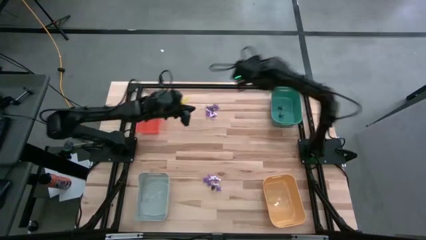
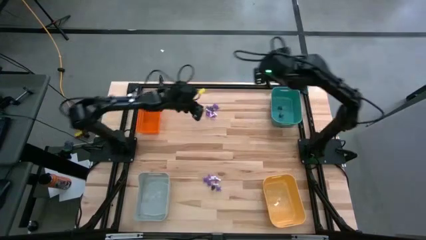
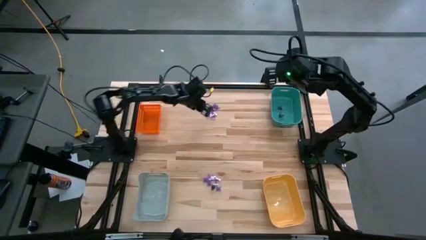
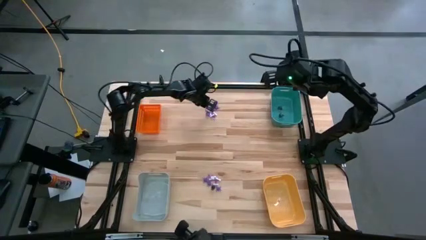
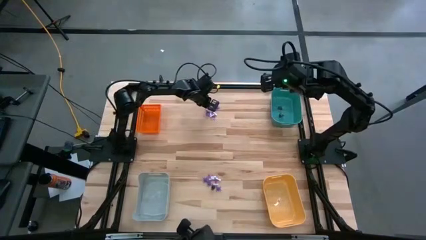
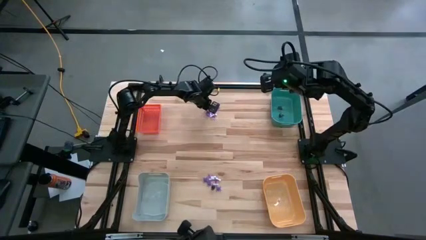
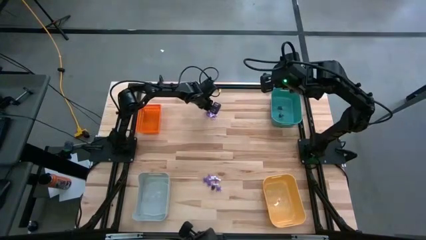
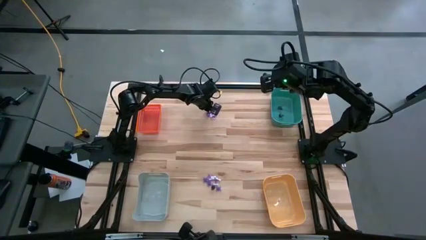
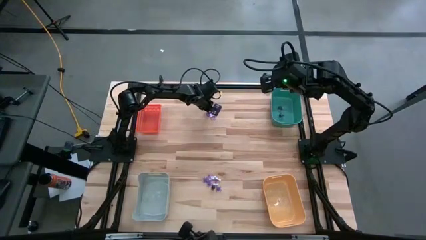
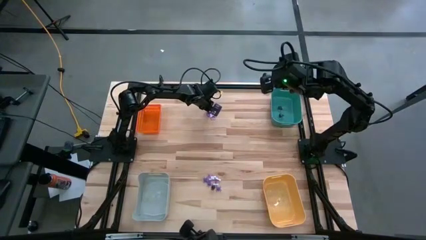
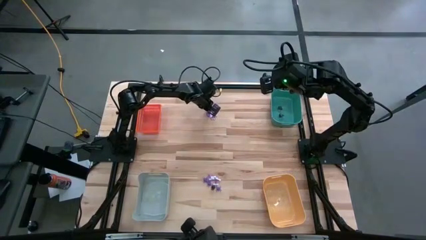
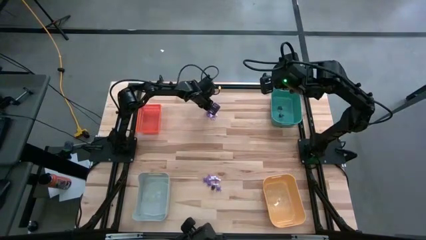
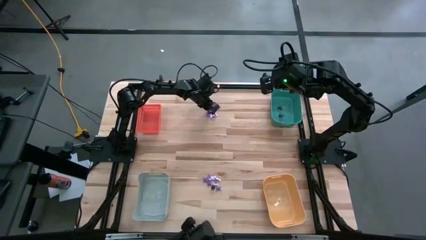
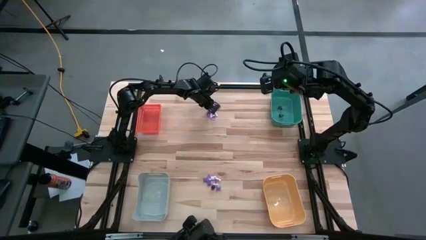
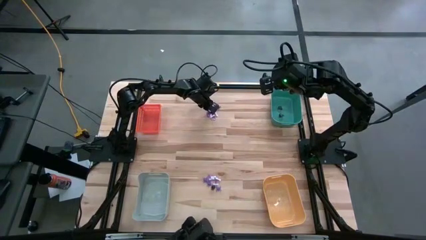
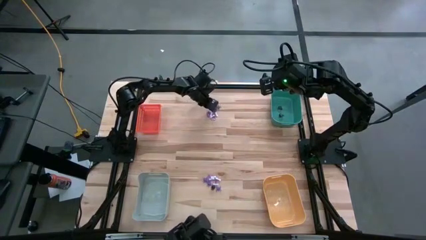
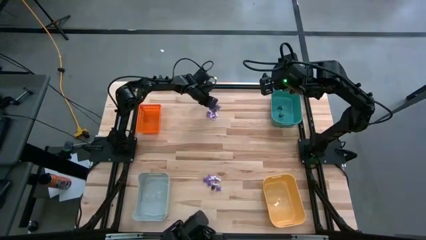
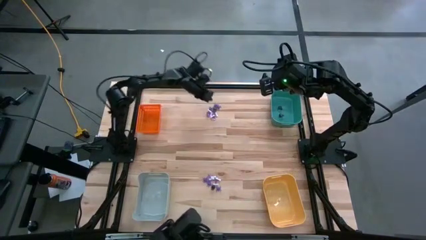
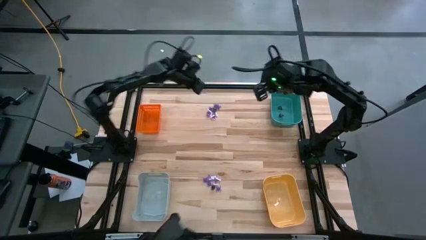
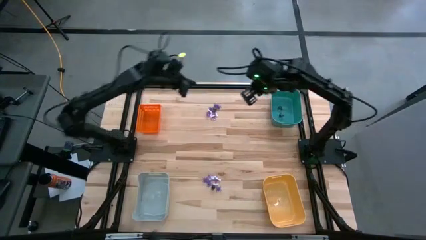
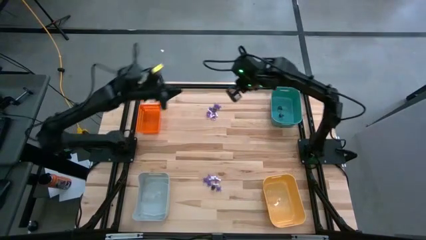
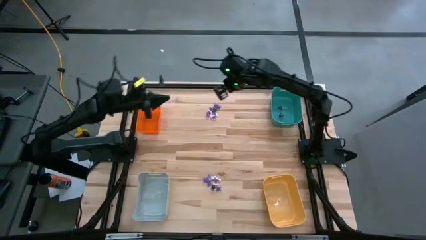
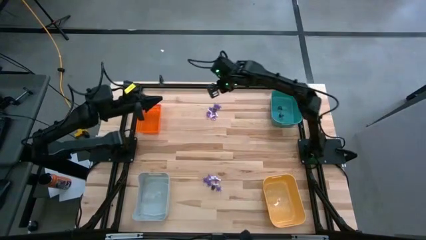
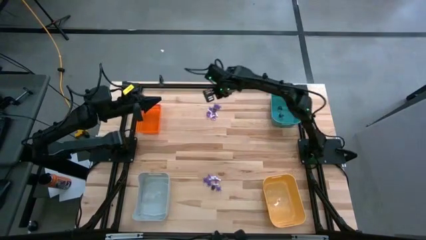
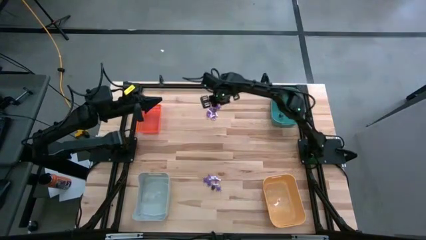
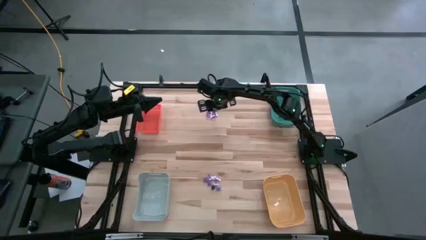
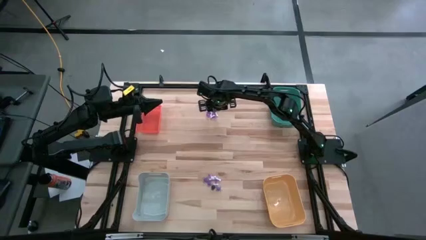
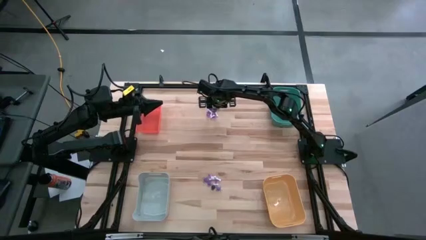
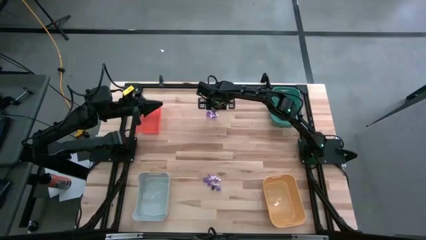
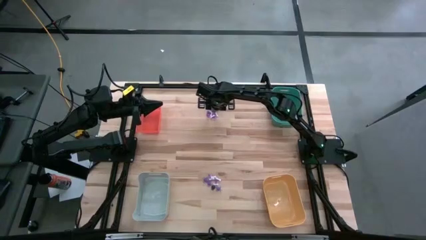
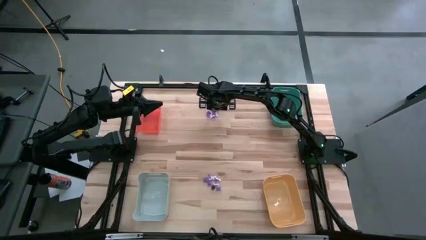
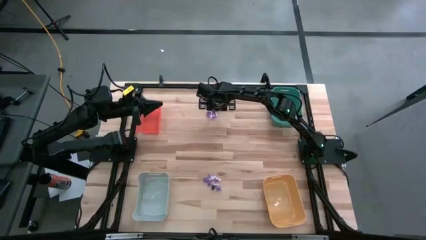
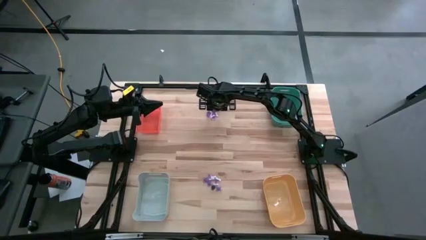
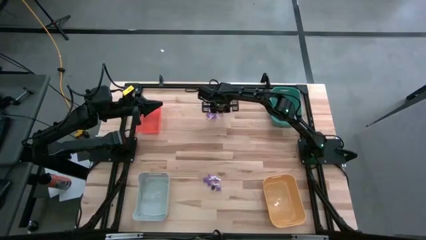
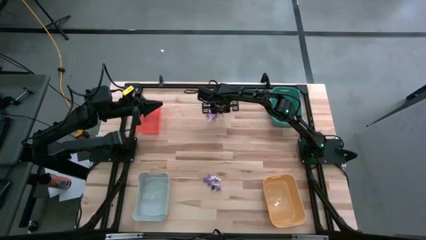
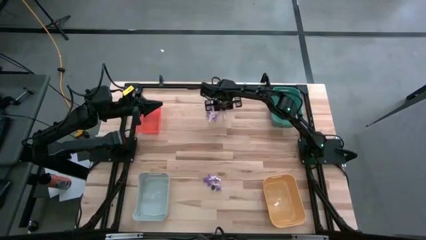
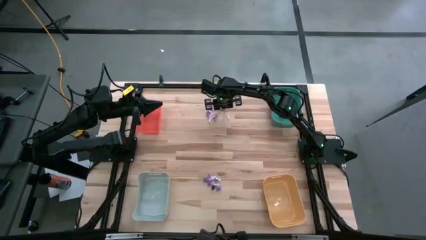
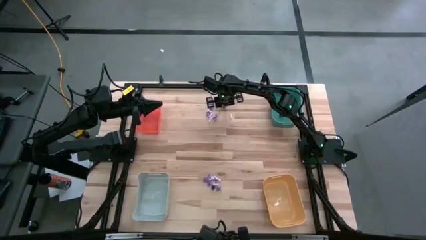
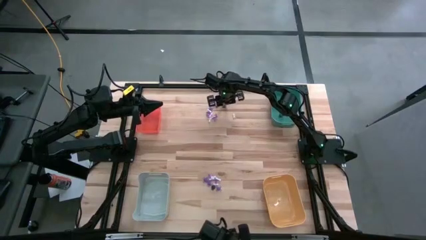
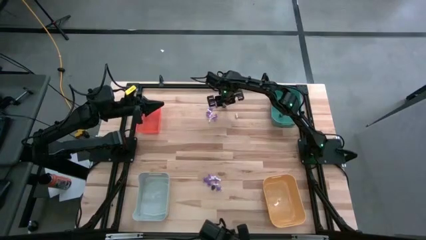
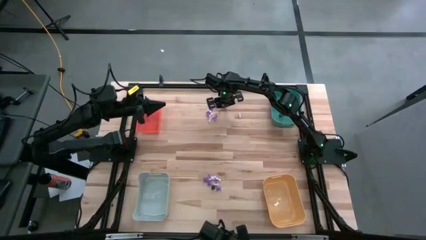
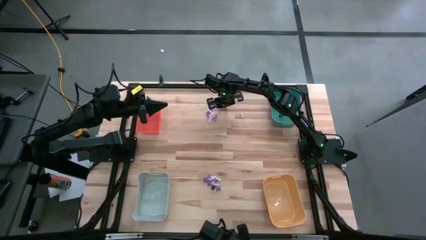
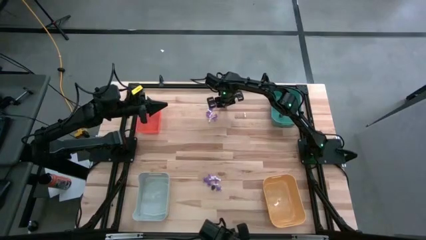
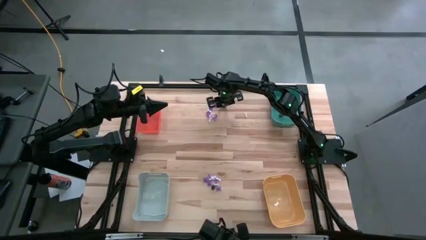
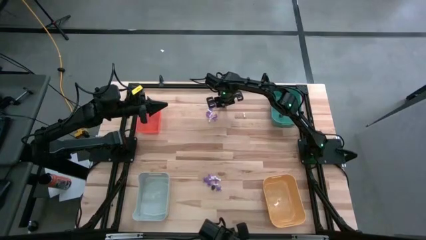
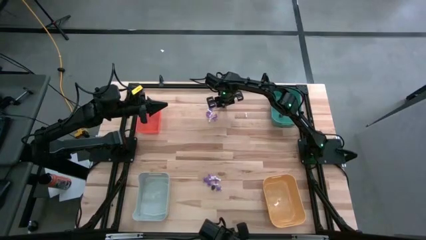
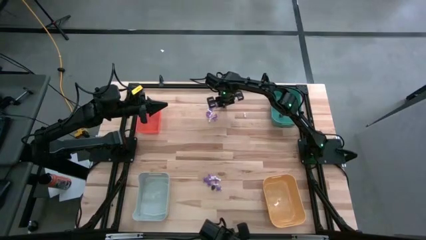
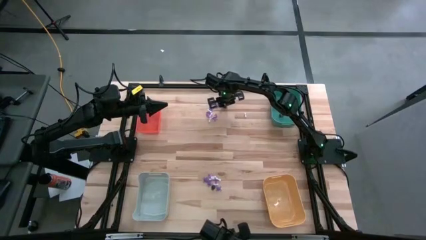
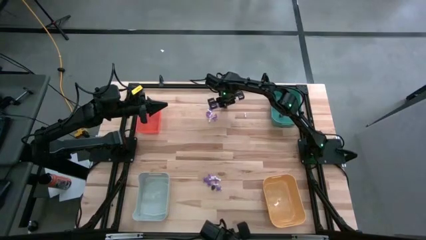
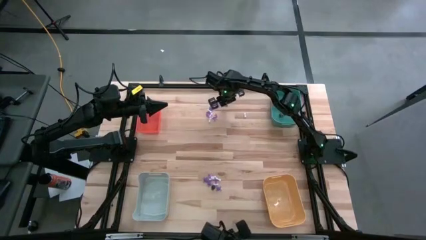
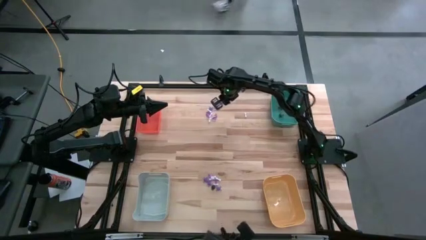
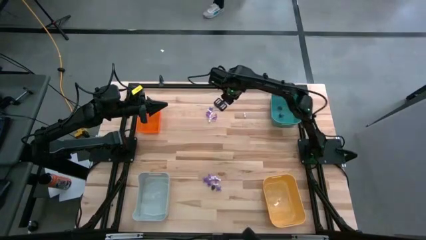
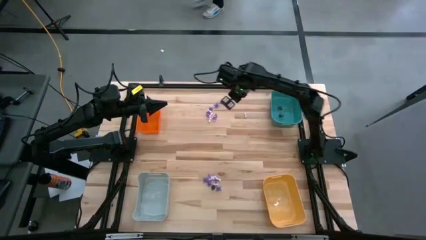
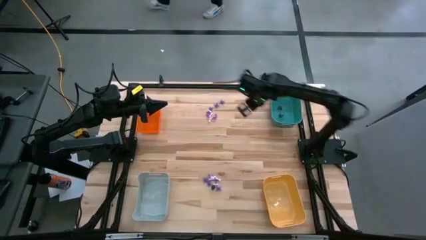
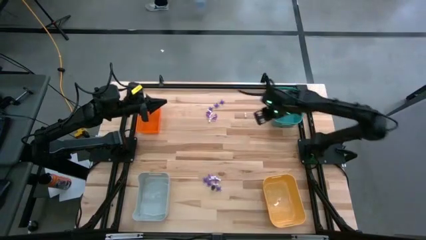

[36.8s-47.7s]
Task: Sort Halloween decoration
Put the black skull toy into the green bin
